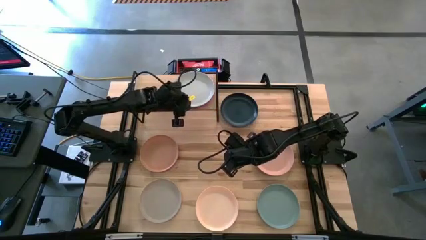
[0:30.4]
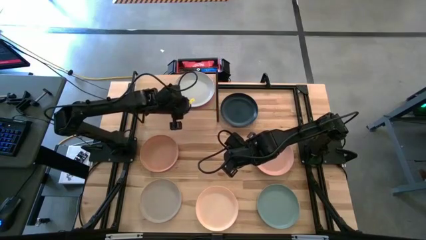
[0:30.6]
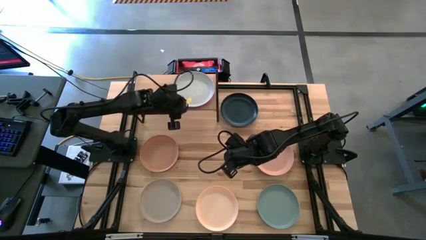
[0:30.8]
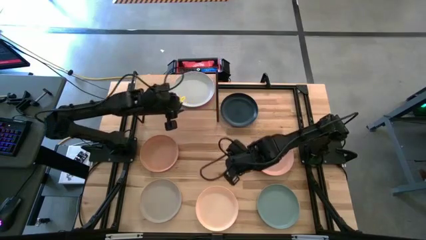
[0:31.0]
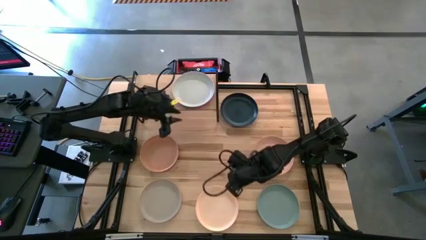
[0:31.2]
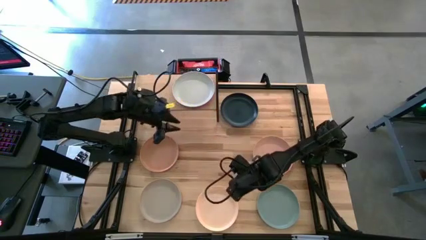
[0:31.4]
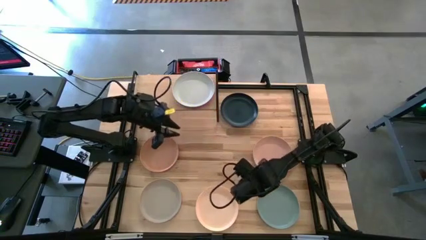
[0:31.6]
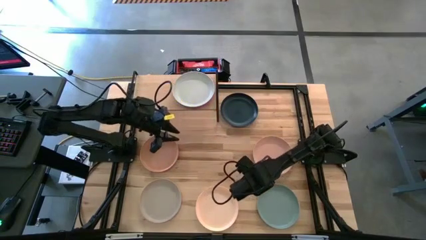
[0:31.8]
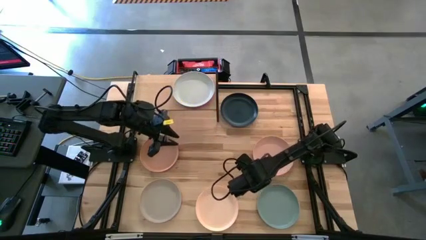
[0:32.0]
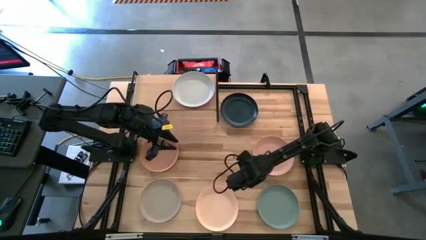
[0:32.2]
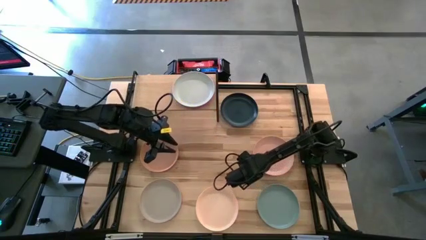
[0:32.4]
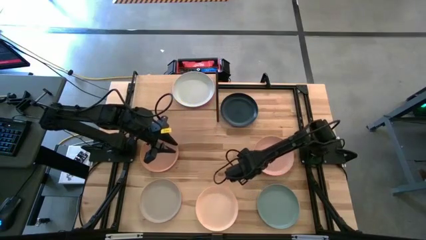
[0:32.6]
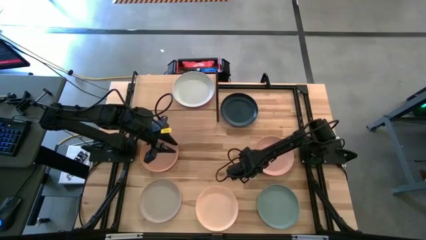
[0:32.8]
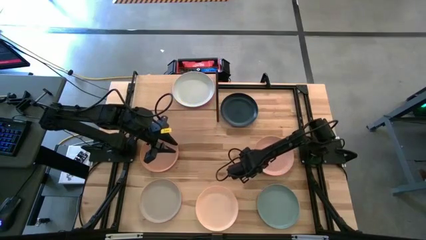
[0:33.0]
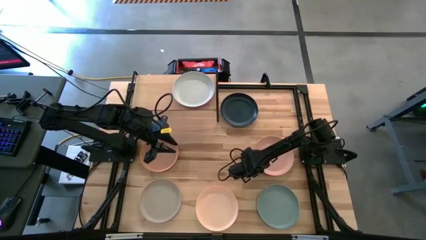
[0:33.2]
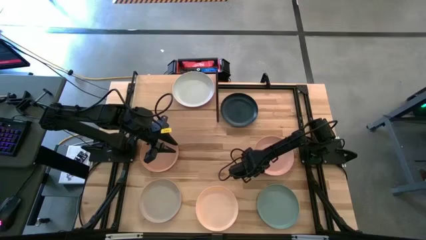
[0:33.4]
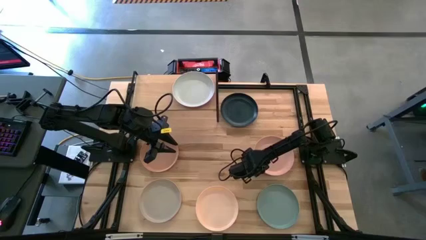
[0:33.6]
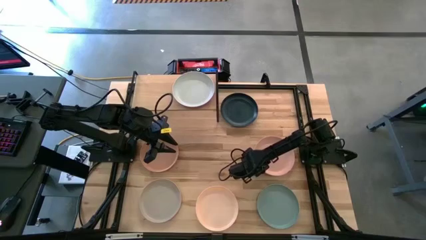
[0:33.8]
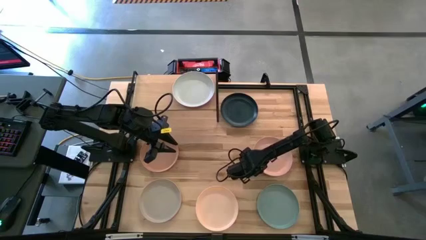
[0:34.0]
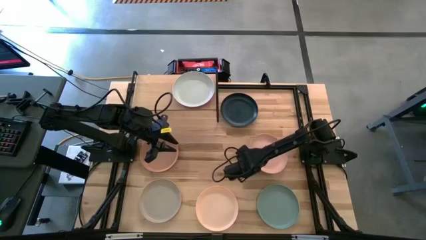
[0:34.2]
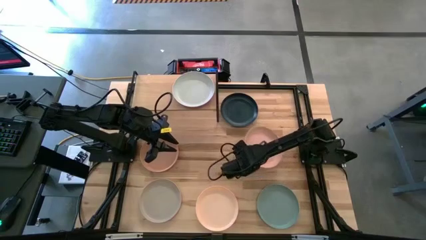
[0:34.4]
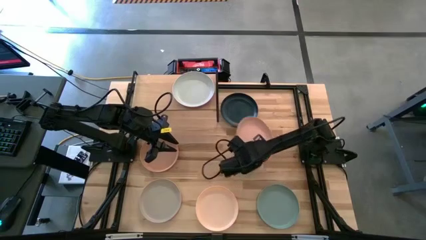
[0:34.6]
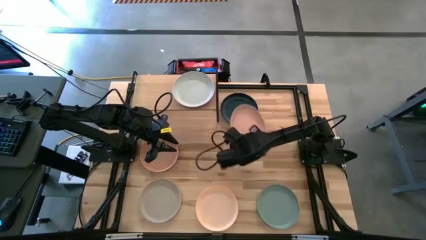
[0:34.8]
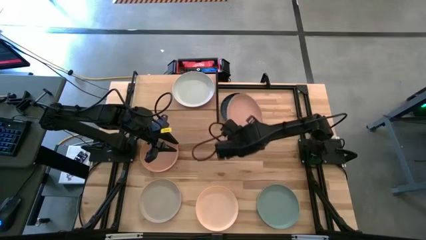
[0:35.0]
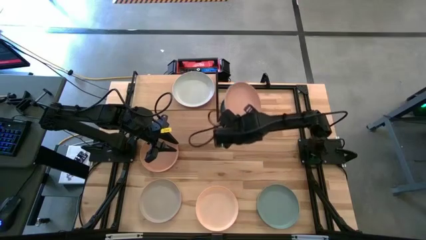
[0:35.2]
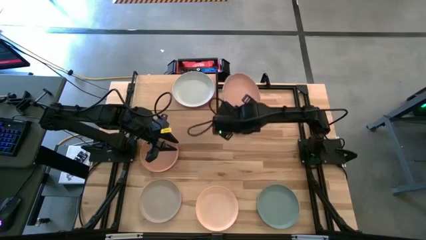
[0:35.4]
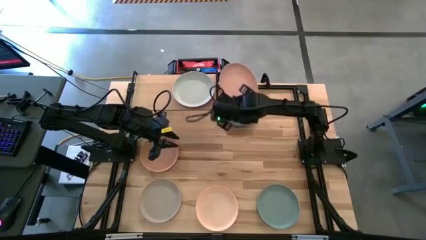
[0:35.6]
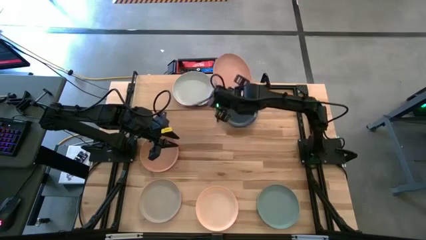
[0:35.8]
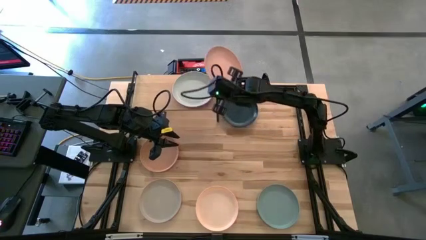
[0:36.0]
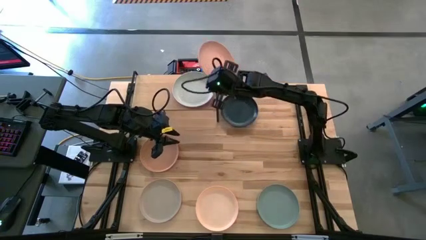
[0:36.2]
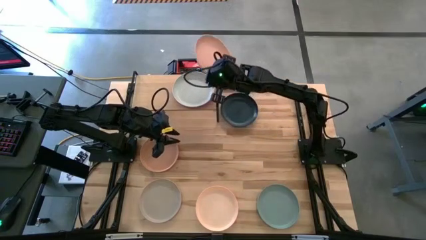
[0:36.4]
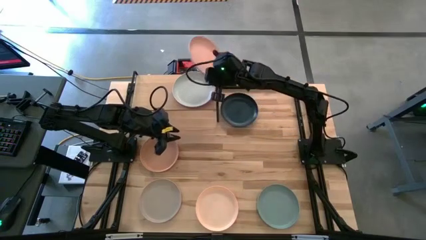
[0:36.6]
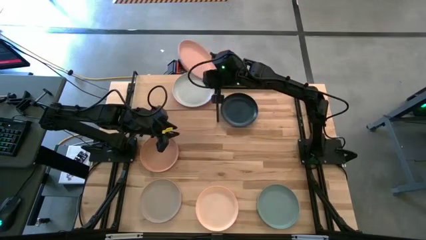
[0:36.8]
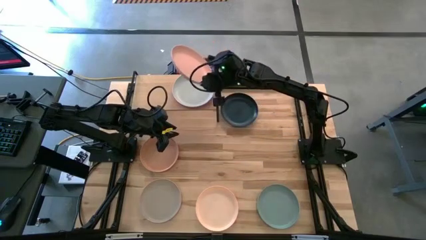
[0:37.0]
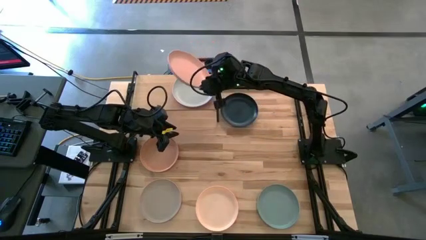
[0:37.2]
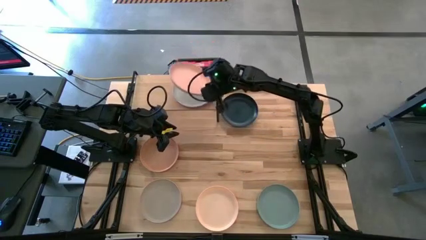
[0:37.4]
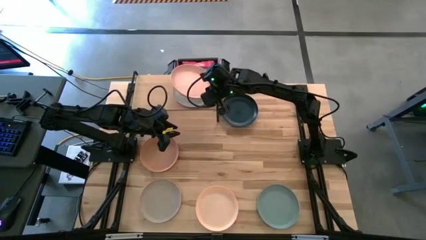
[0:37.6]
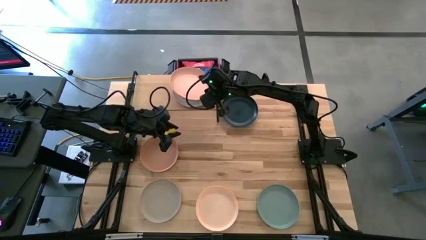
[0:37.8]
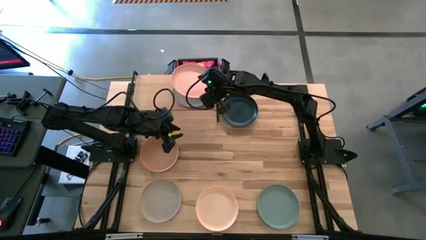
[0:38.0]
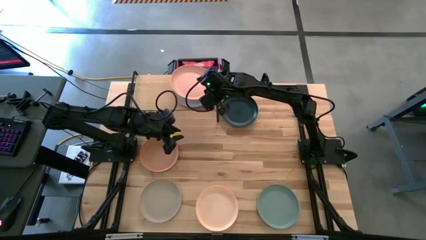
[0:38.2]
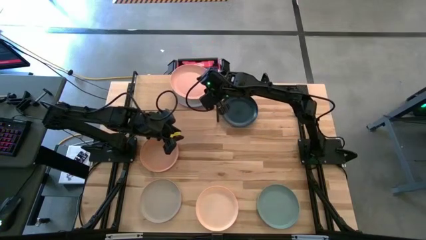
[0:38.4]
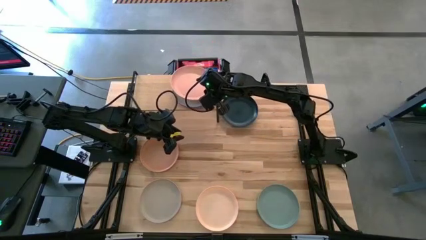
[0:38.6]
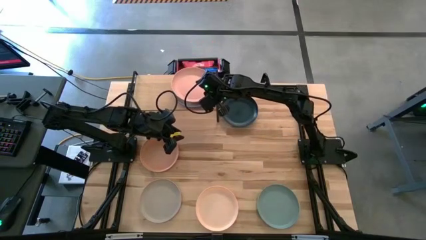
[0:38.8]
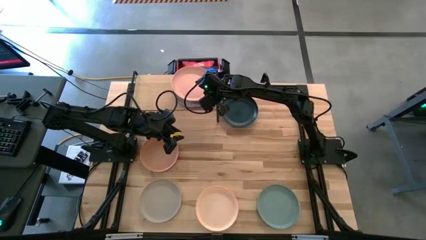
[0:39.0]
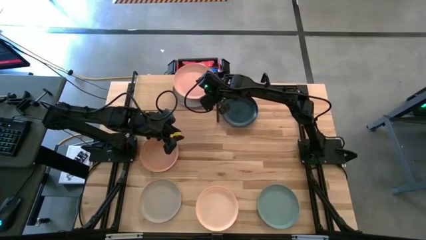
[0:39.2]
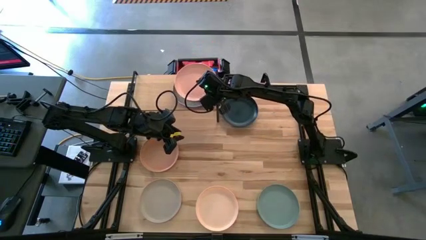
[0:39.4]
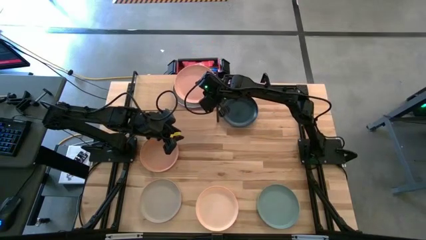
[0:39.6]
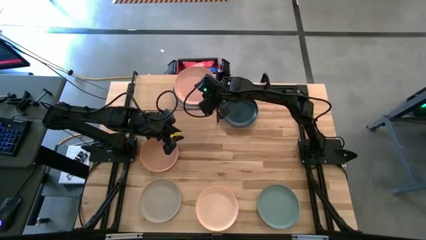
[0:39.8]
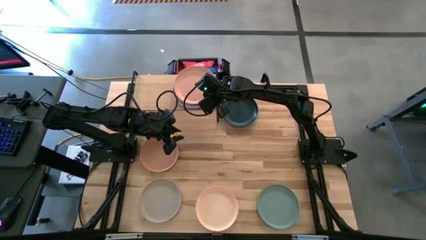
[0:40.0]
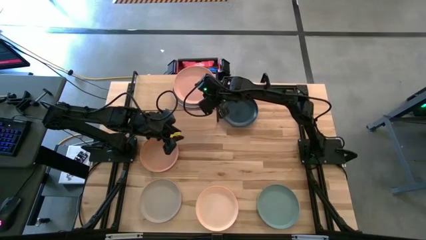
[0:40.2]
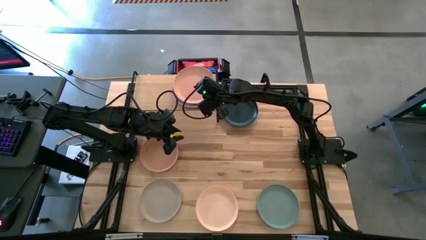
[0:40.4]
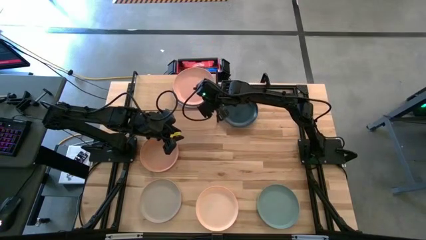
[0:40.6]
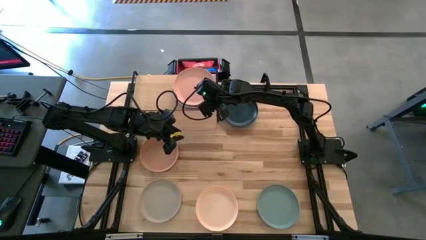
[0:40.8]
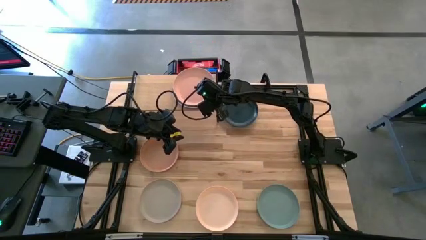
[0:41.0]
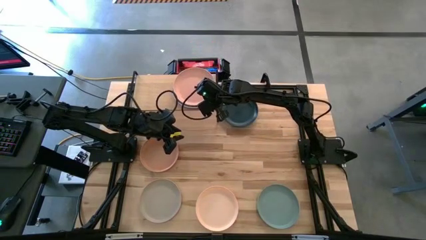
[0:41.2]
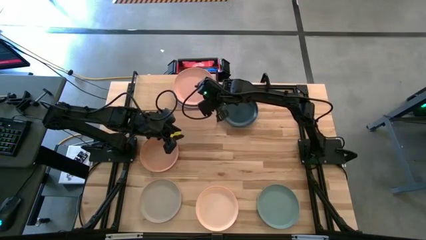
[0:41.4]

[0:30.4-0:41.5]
Task: Place and stack plates onto a shelf
Stack the top light orange plate on top of the gray plate on the shelf
